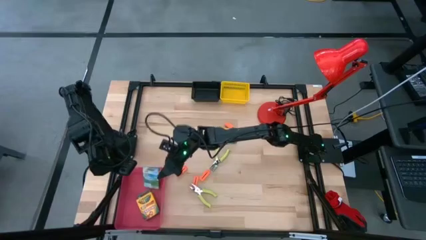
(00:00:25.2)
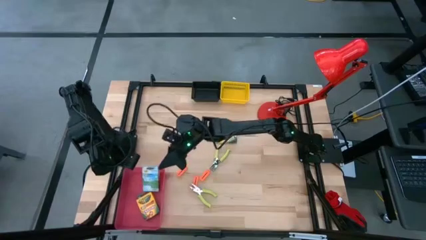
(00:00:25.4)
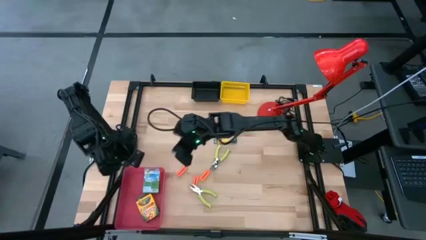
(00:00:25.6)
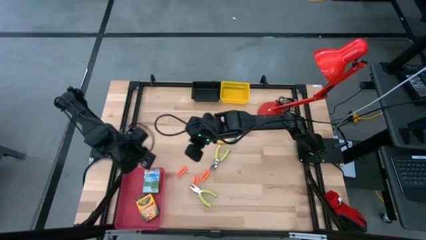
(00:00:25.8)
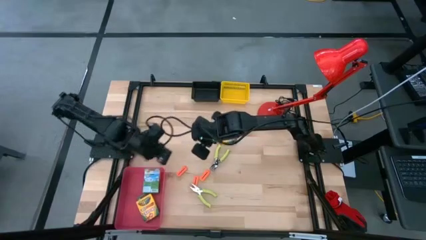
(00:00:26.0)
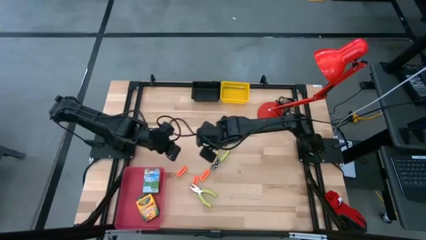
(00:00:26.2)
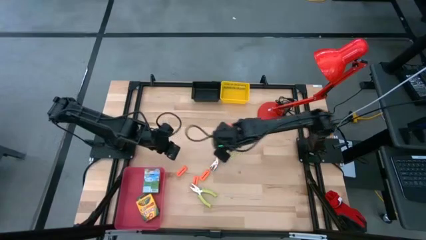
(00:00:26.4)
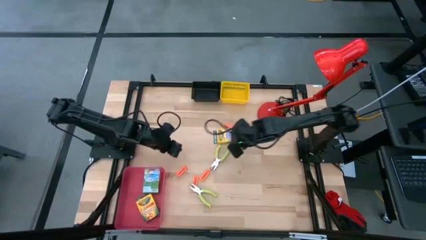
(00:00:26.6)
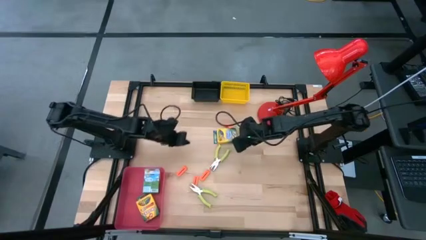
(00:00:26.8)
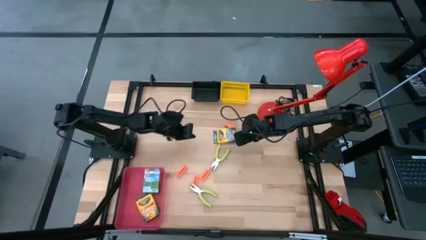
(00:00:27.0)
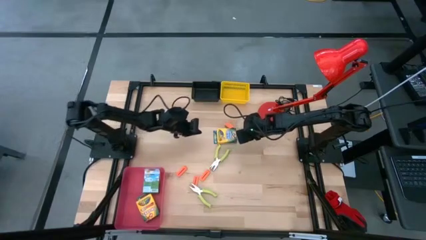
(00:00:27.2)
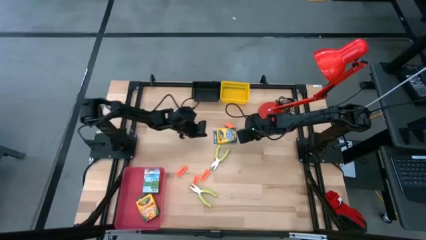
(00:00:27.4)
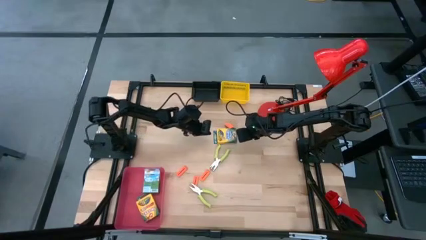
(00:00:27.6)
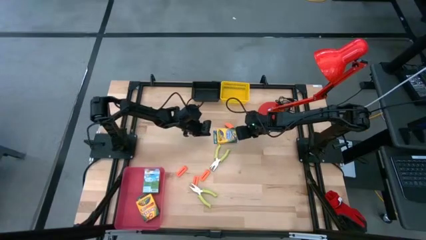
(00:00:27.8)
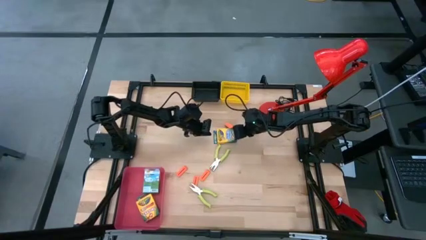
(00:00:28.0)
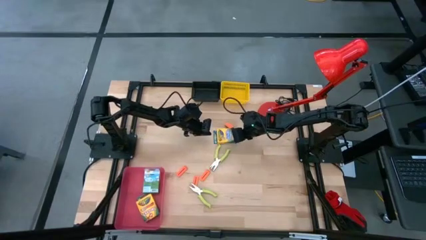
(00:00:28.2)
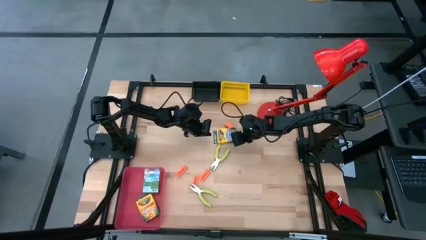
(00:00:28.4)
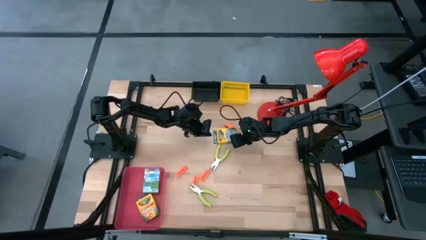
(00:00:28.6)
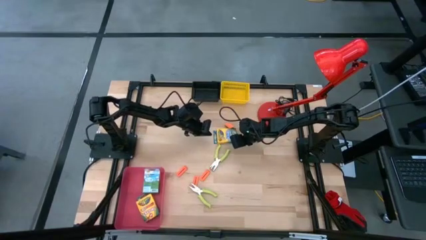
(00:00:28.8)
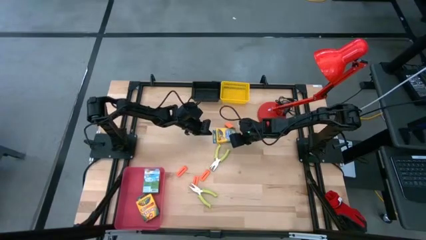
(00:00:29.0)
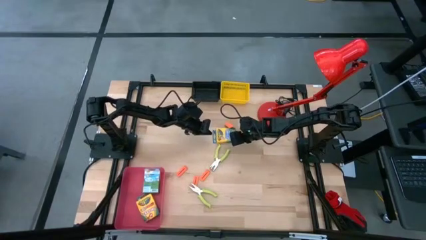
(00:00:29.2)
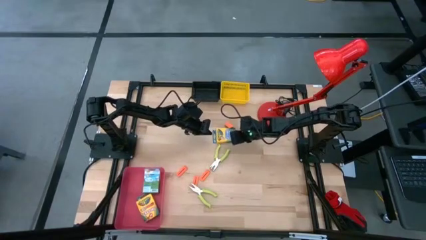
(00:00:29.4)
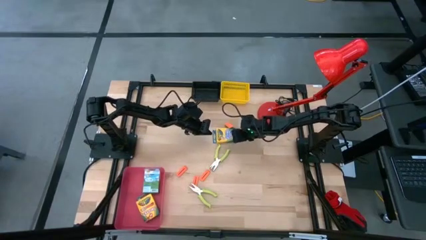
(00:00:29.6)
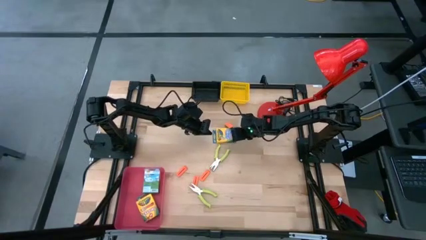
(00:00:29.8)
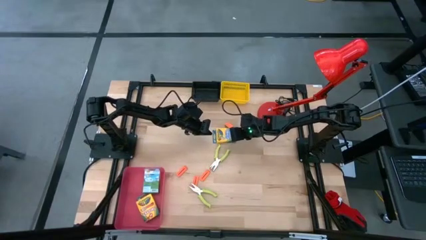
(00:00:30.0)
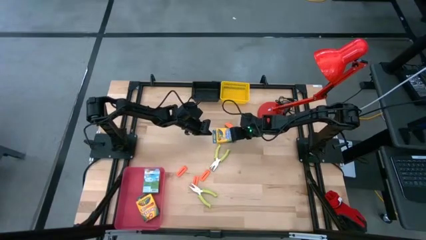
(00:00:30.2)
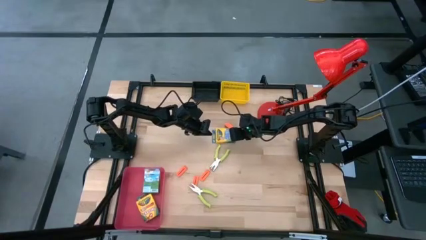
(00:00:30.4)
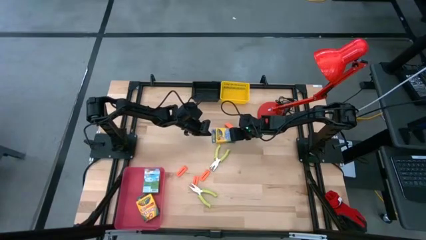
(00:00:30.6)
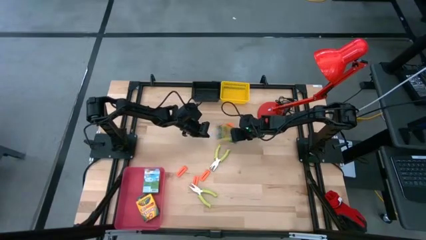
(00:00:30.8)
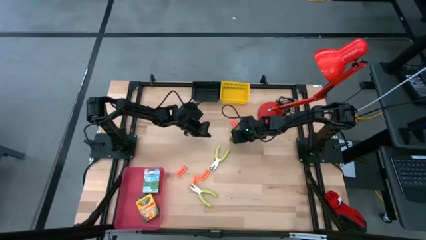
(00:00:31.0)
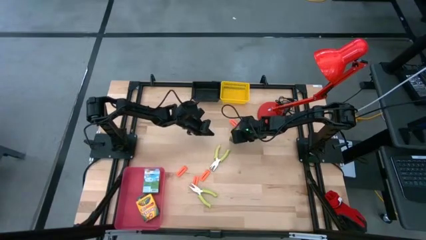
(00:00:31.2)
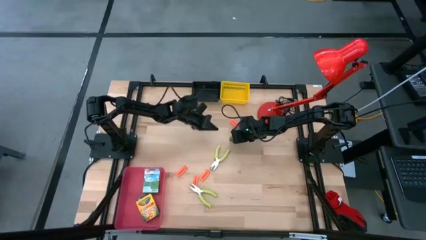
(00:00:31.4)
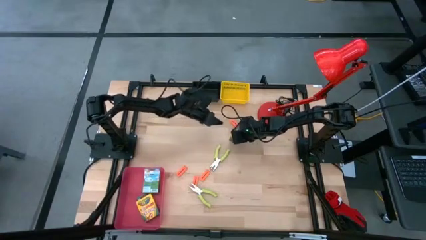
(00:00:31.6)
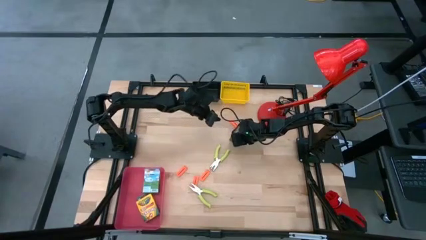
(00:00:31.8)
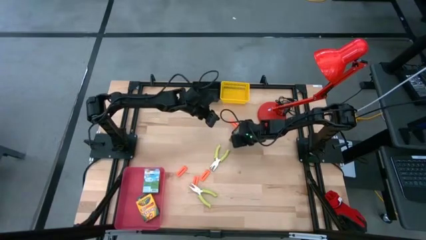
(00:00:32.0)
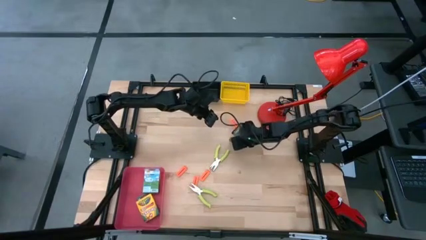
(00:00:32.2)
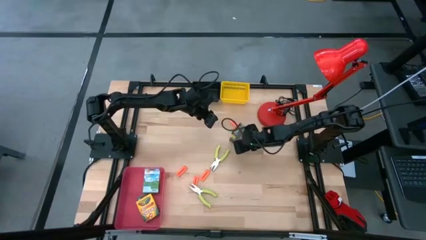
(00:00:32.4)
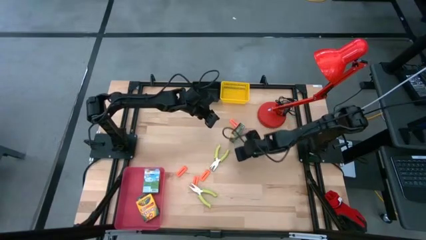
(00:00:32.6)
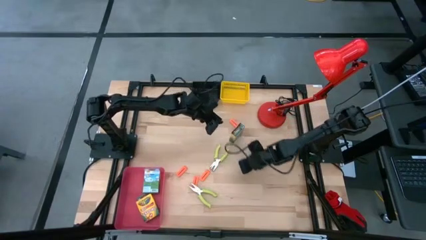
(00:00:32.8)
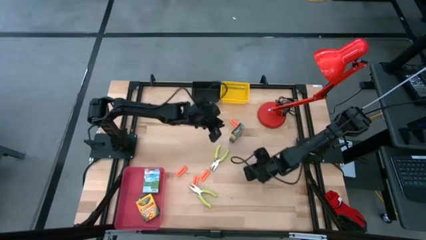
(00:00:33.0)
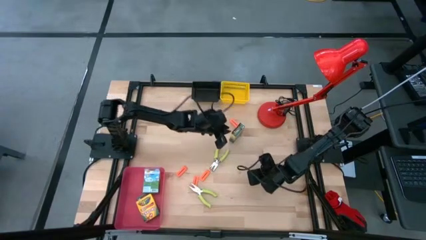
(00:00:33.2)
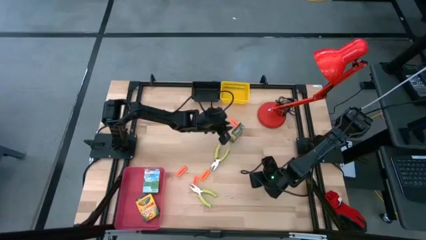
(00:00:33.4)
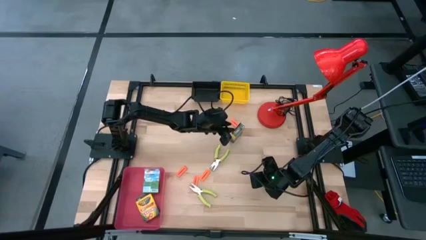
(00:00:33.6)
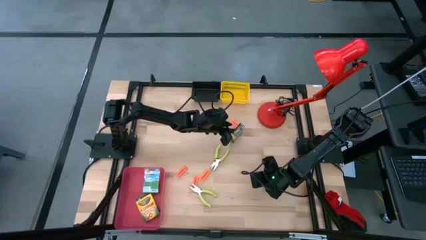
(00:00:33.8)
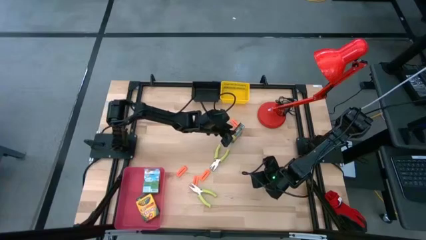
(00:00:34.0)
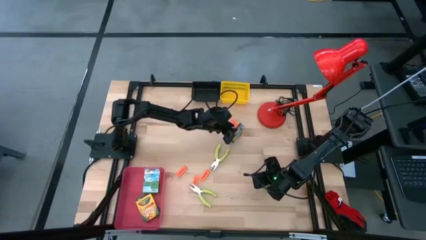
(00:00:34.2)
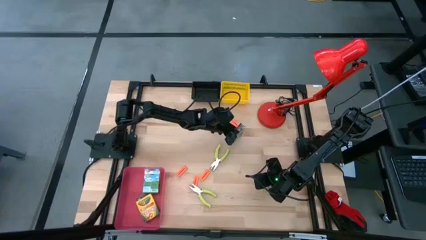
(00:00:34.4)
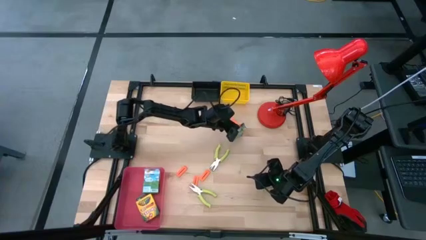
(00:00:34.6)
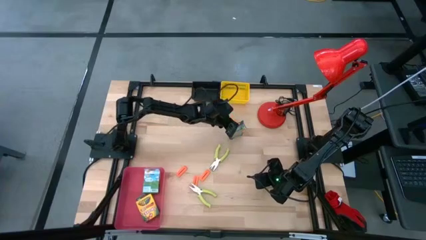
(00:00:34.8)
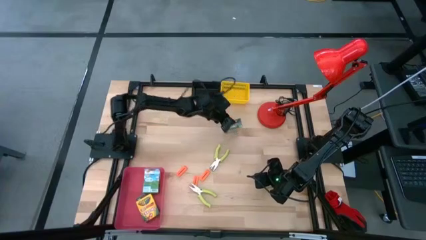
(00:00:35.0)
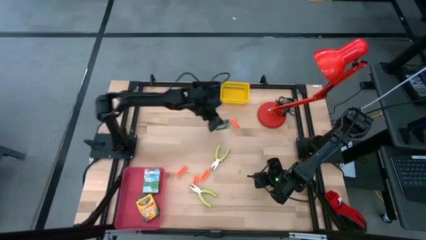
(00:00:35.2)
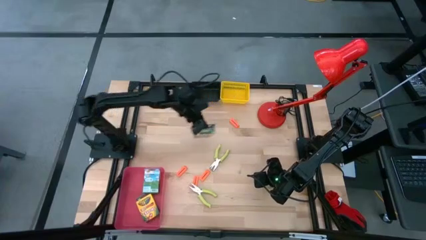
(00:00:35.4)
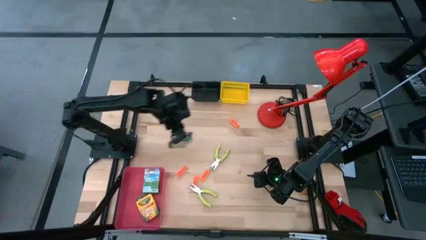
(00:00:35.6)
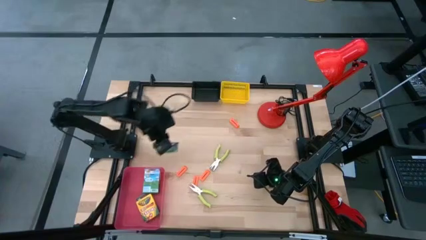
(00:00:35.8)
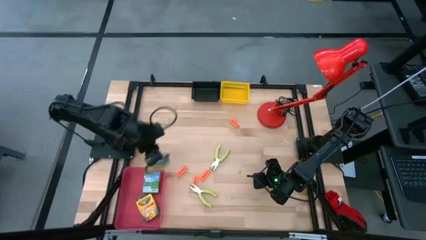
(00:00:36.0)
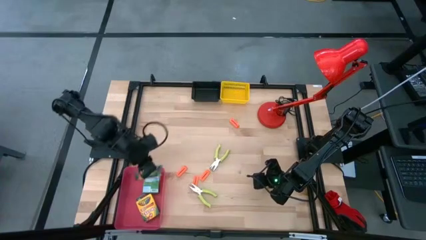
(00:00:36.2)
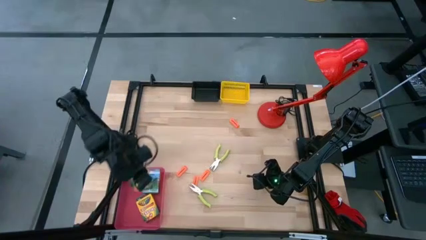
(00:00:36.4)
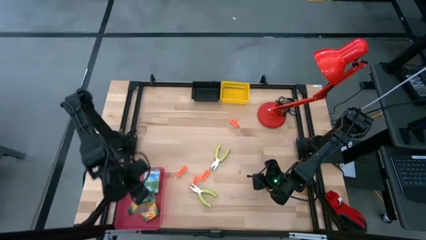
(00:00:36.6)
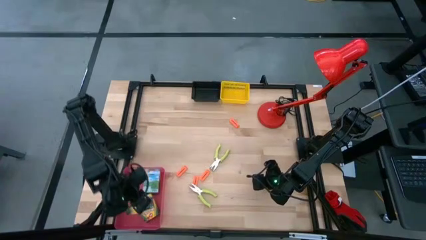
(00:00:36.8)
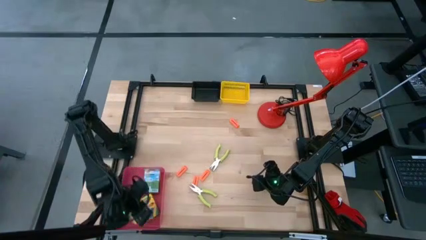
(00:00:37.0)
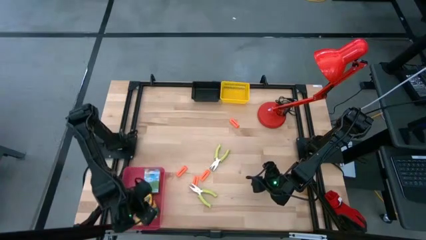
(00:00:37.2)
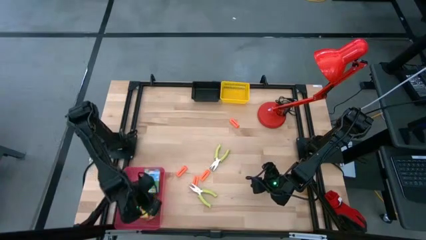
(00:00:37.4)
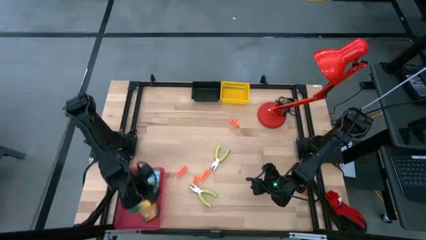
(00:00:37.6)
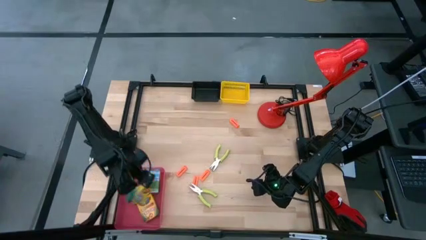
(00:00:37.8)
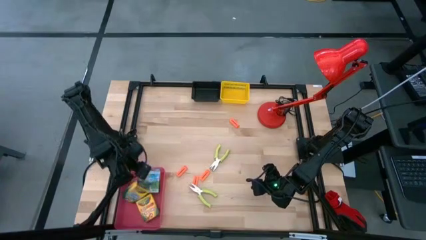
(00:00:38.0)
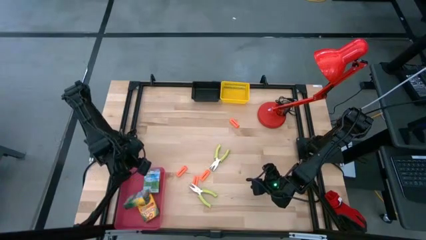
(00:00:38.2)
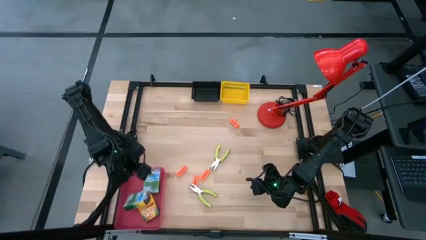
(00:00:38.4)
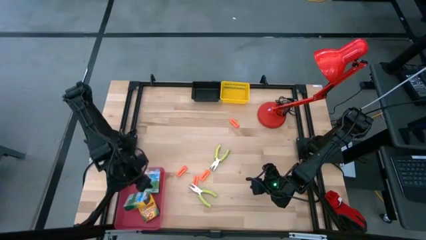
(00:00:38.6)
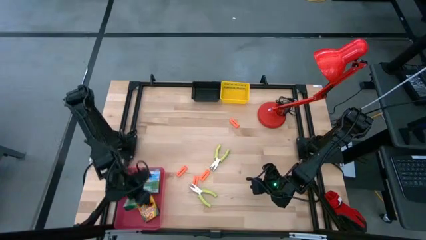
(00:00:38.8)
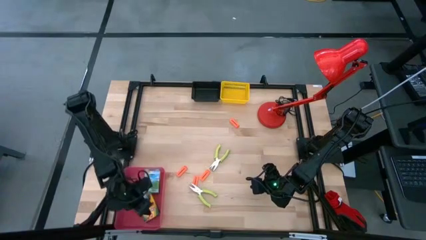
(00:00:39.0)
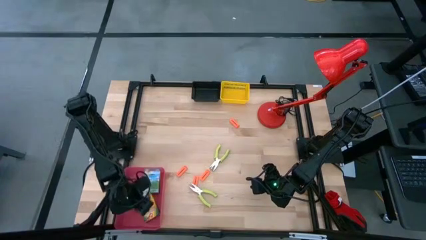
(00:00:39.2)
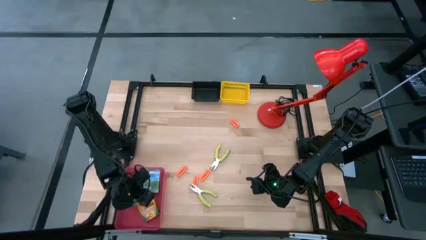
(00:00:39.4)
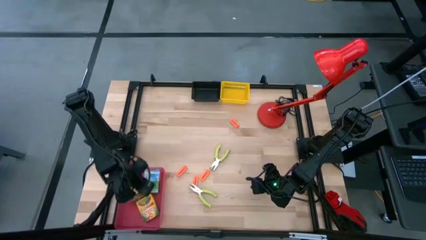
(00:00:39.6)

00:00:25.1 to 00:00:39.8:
Task: Pick & Place School Supplies
Put the crayon box into the red bin
